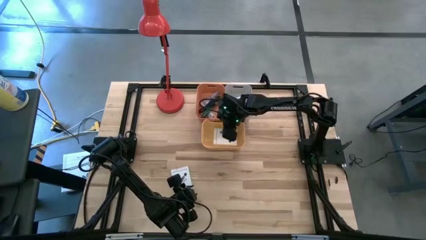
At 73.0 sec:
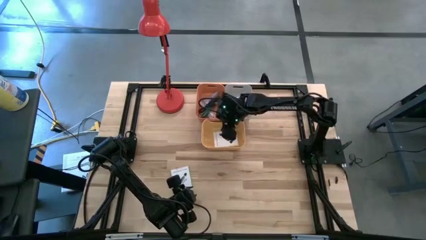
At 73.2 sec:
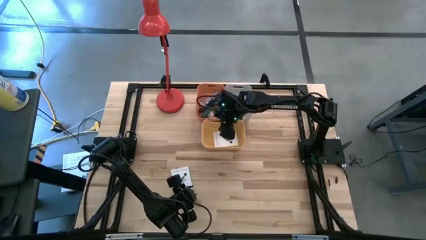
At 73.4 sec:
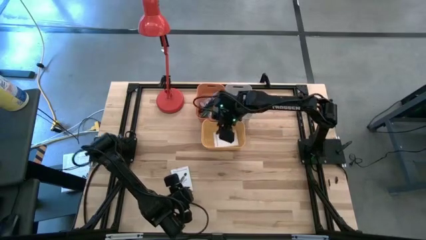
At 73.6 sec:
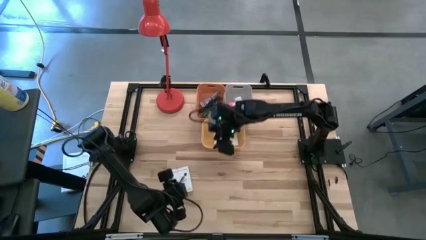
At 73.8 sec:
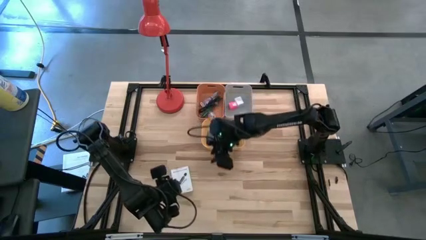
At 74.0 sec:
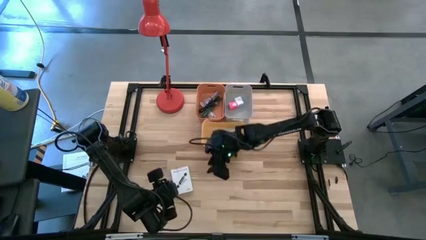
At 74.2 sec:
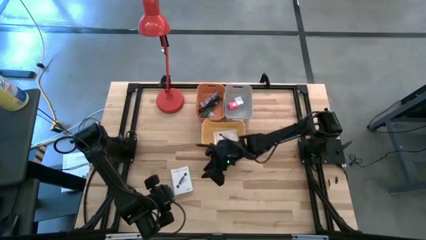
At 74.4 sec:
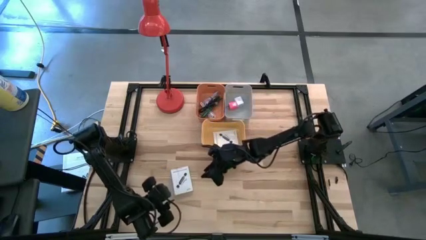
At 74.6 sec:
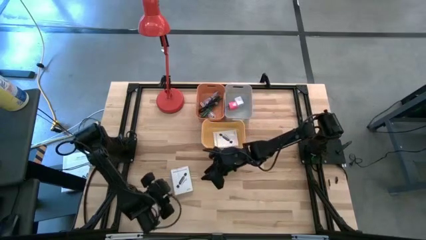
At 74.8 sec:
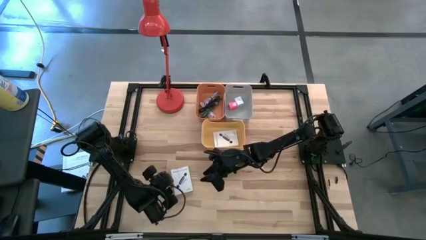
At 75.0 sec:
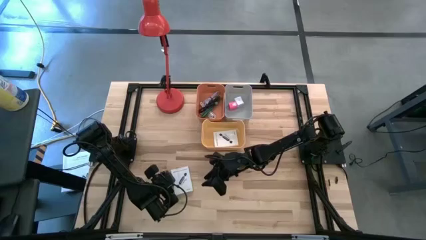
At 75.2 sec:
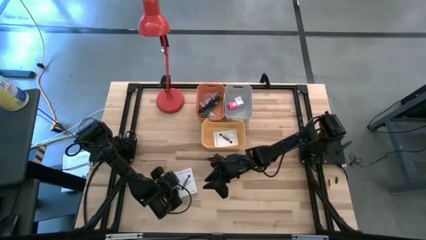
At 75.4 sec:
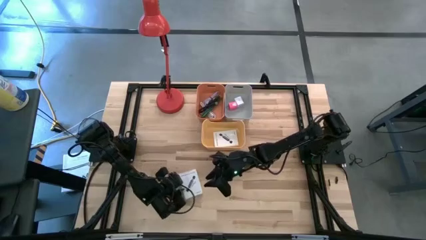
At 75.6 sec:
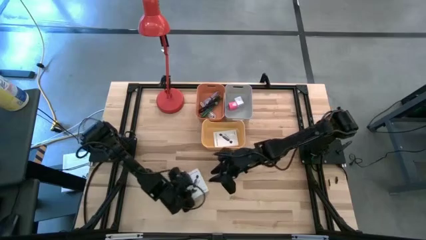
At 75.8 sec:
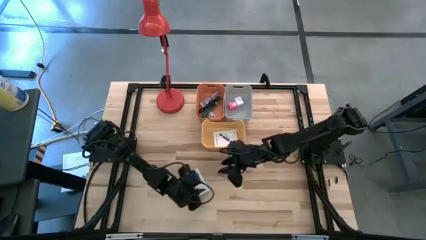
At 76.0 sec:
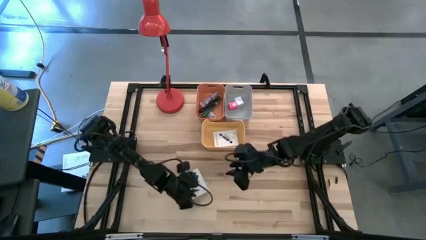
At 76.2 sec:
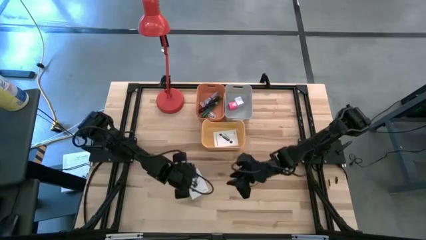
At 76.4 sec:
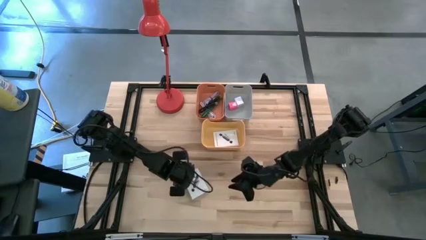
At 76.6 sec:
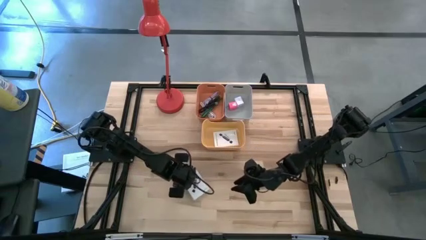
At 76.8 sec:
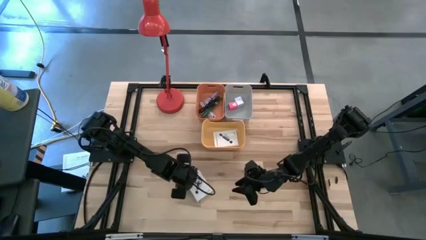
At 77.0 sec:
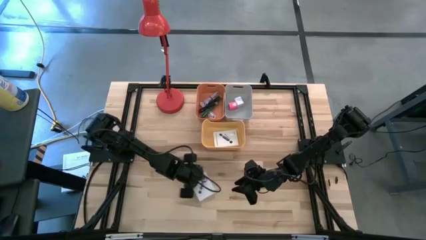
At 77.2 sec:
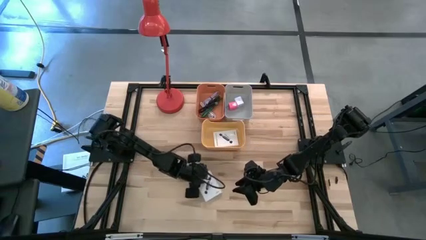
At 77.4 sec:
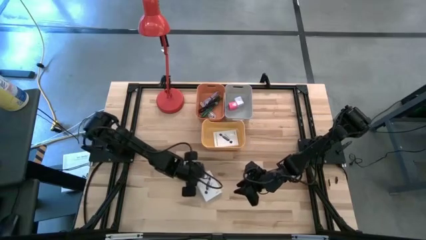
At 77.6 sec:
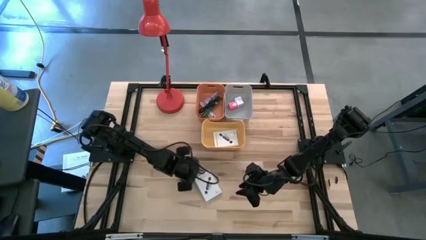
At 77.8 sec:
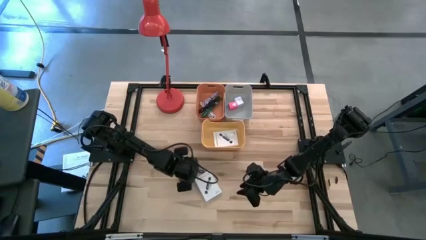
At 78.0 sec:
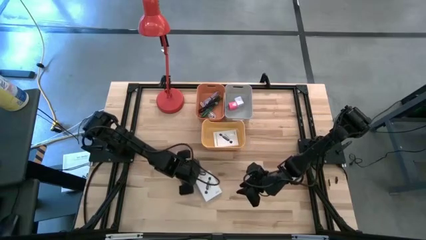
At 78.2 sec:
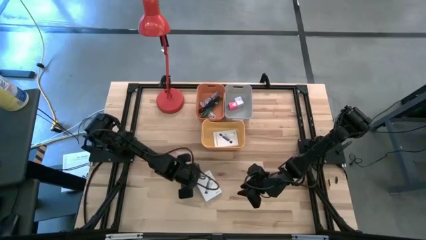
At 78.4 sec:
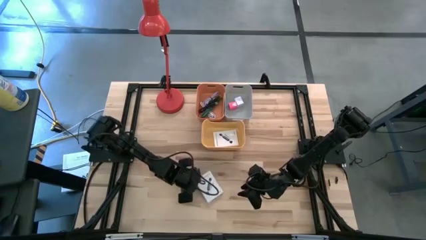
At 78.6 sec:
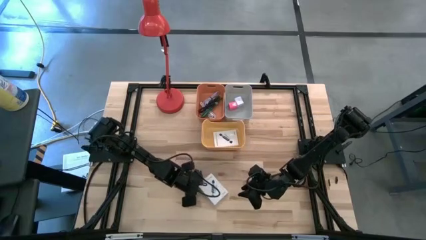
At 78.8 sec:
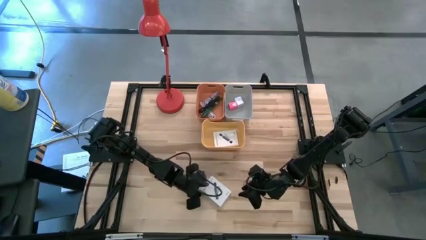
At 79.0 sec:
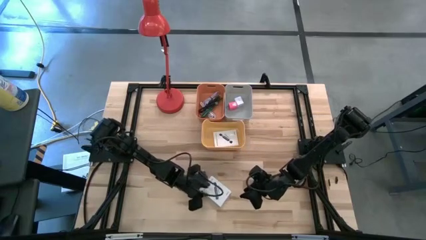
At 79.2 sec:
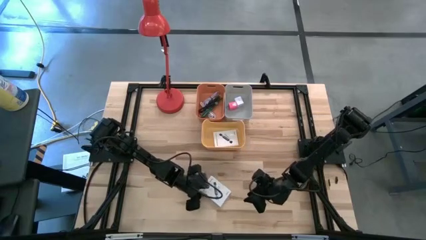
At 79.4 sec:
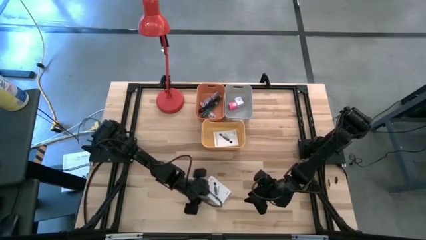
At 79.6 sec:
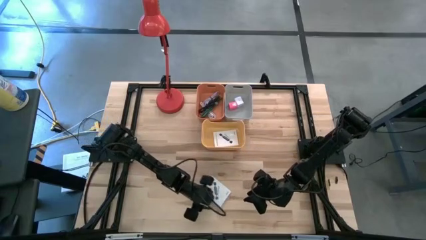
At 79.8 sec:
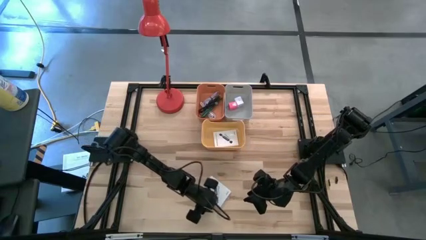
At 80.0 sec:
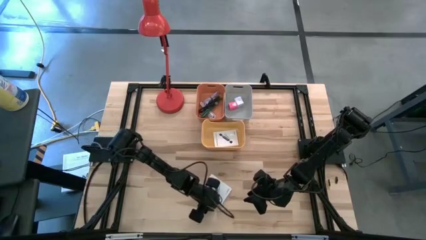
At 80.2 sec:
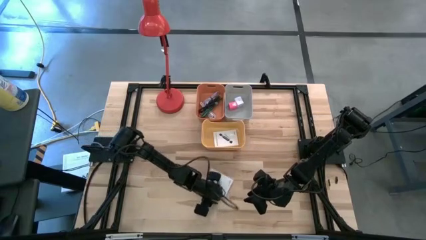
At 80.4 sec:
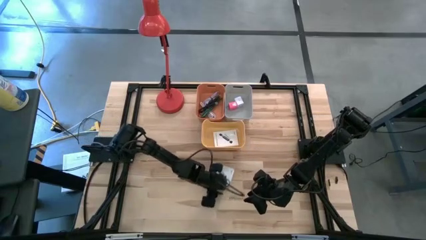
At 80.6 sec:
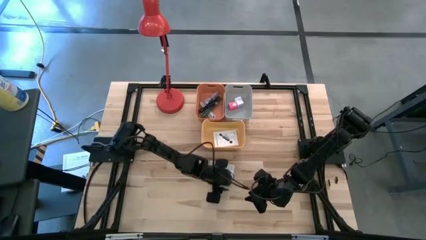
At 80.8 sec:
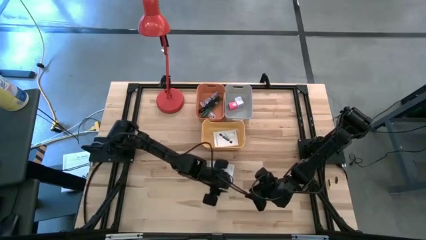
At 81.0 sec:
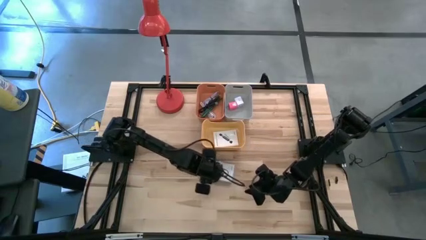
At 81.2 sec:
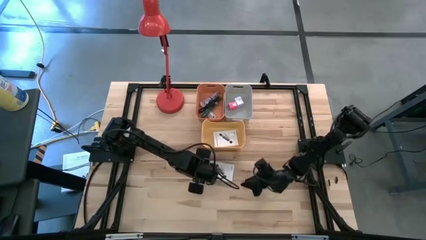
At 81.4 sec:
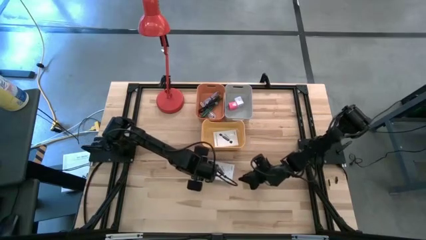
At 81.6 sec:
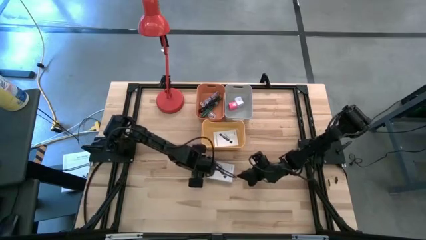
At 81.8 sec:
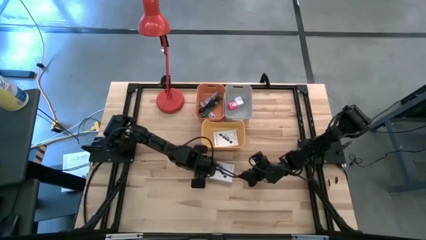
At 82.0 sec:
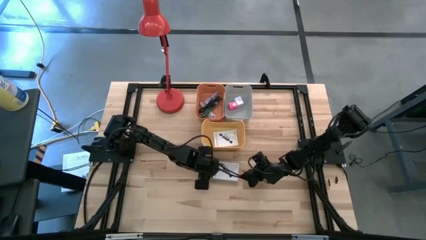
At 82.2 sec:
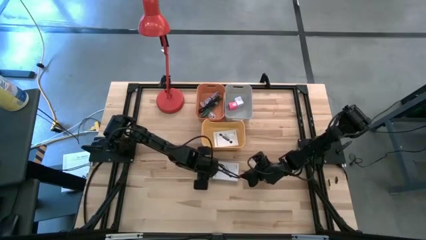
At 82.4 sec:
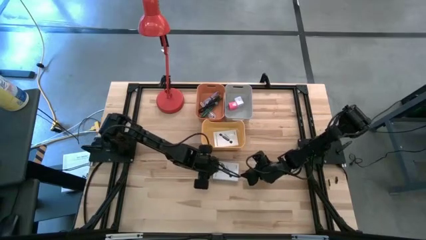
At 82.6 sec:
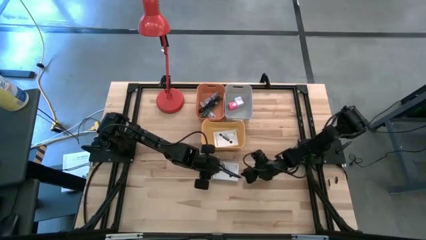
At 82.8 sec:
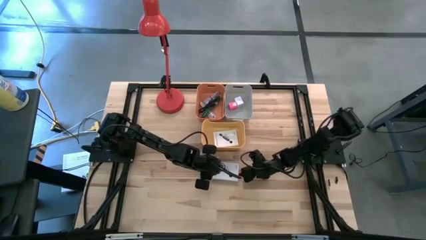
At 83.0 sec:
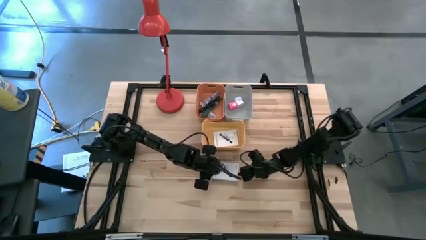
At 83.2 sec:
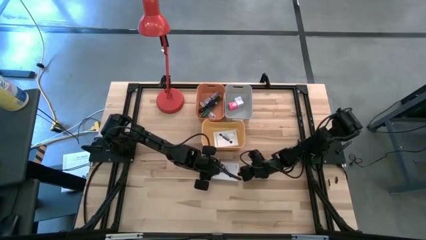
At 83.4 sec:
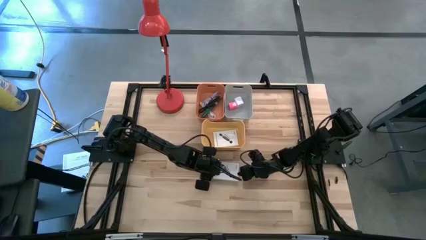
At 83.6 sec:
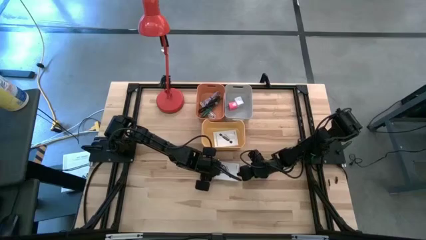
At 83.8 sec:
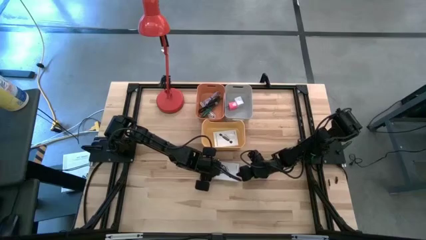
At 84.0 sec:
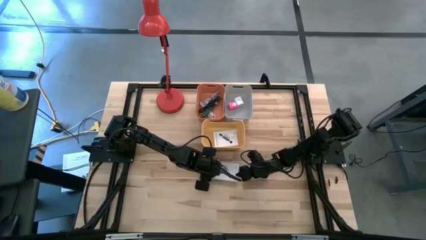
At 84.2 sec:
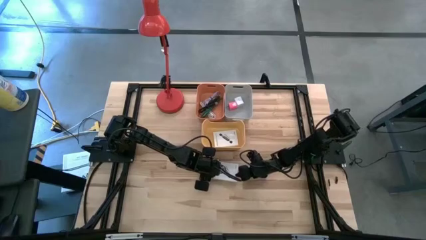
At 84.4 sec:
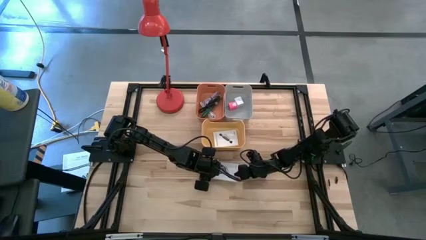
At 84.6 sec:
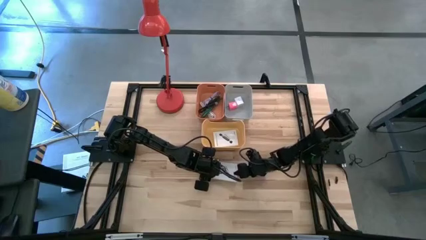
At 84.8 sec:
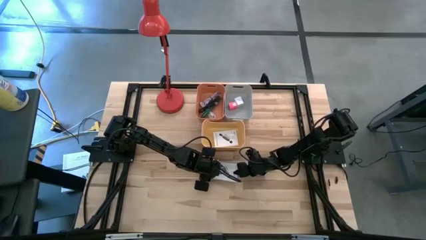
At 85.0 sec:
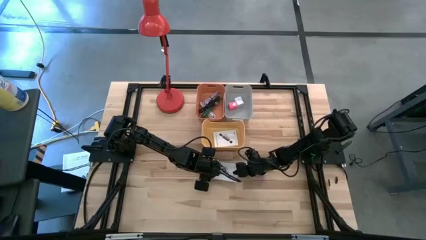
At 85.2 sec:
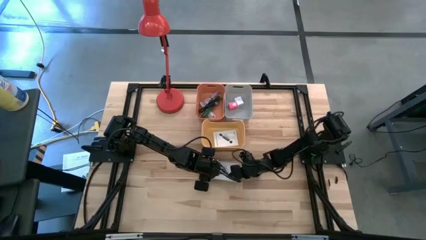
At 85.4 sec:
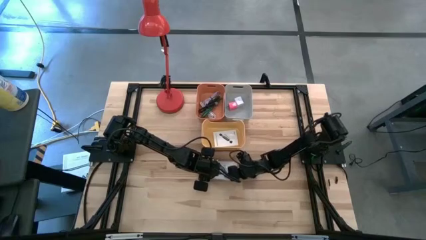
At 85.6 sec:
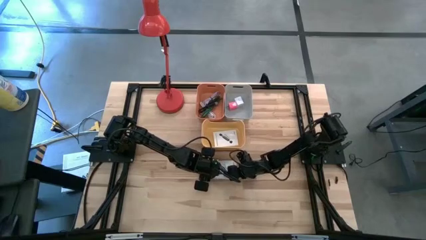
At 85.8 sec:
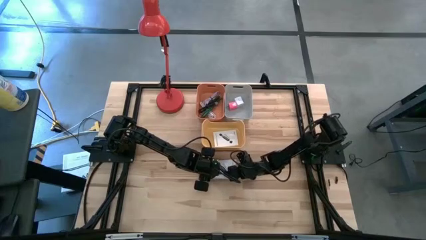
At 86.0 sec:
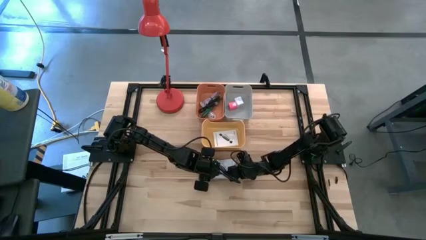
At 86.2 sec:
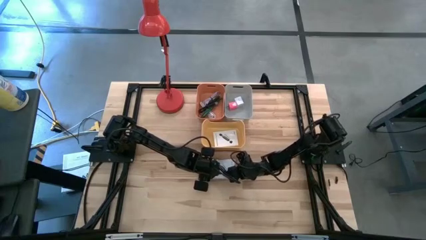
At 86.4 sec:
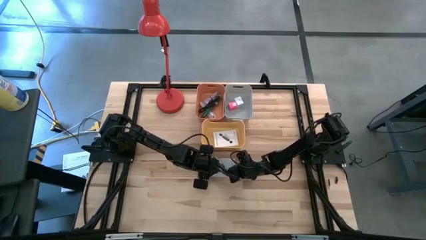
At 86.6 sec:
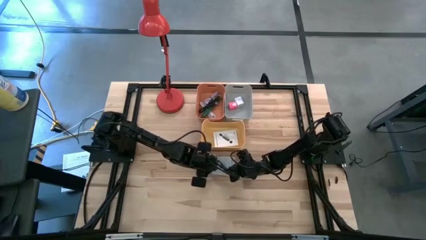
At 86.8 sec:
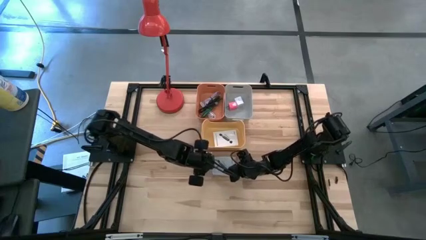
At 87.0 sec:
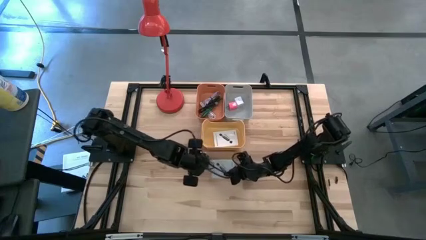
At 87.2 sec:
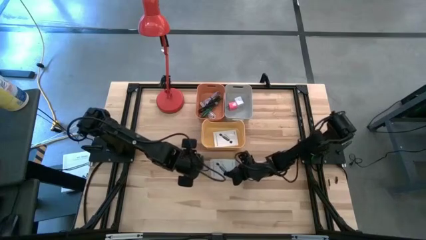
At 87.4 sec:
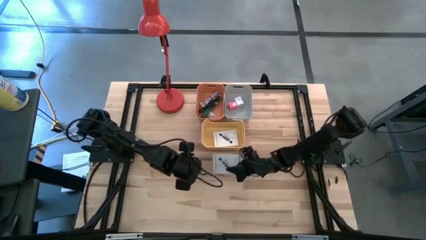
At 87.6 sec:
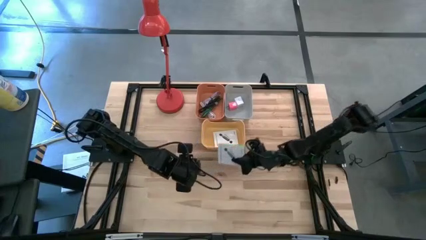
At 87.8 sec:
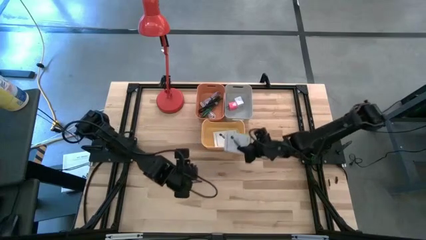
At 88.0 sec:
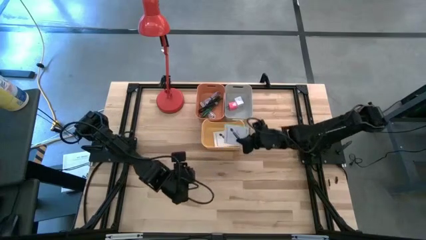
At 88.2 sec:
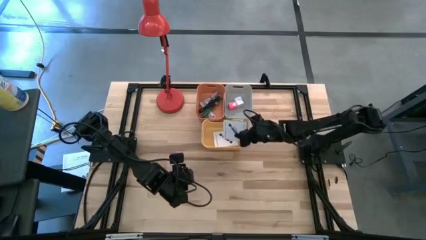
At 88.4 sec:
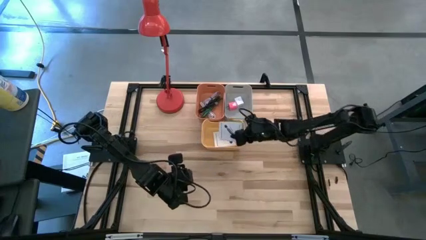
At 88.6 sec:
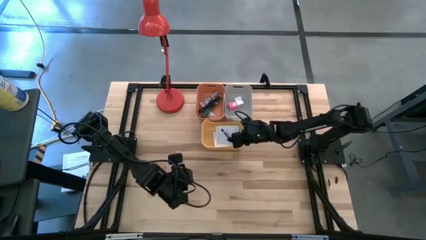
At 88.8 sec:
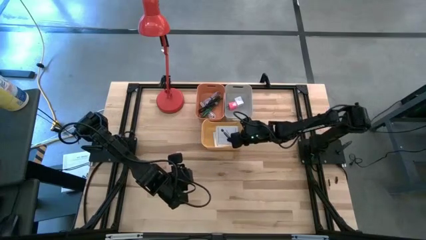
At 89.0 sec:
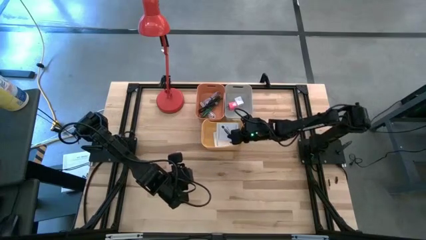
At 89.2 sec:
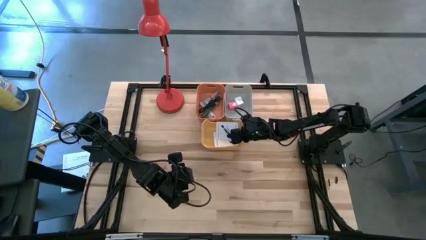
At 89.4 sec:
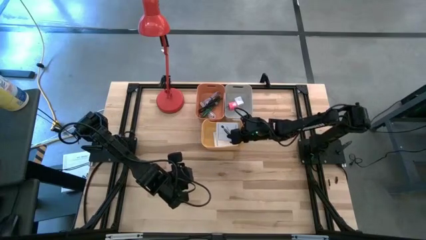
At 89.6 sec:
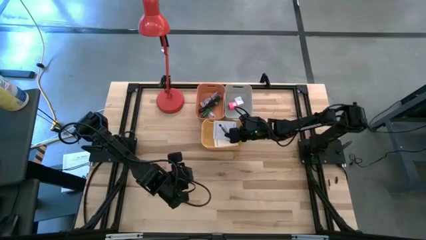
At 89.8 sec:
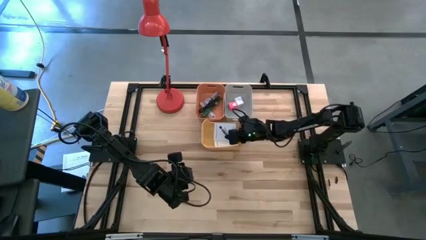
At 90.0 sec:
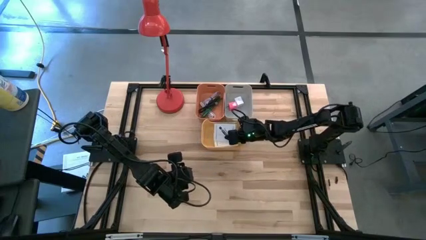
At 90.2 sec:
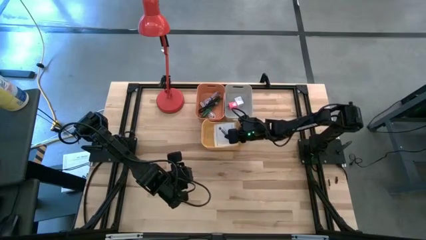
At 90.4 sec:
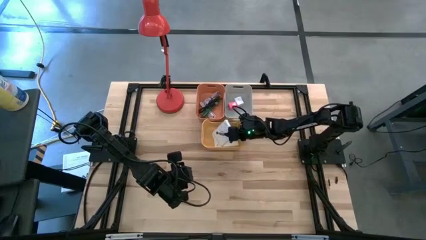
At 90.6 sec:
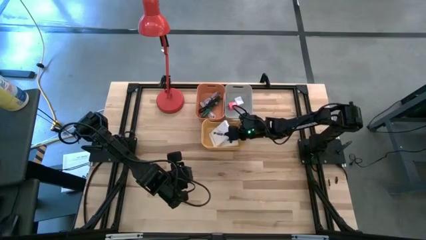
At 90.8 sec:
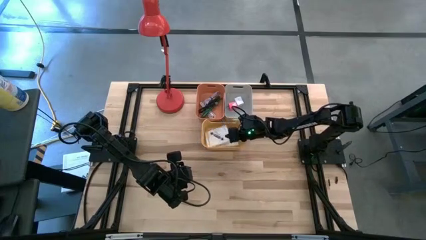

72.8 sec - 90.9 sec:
Task: Pick and place items into bin
Put the card reader box into the yellow bin
